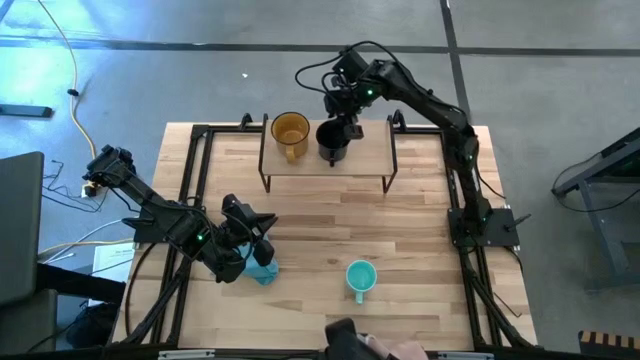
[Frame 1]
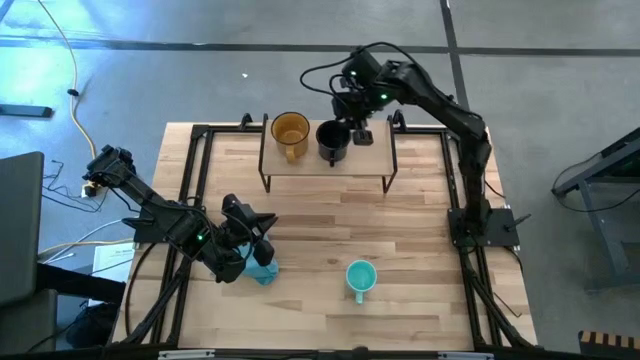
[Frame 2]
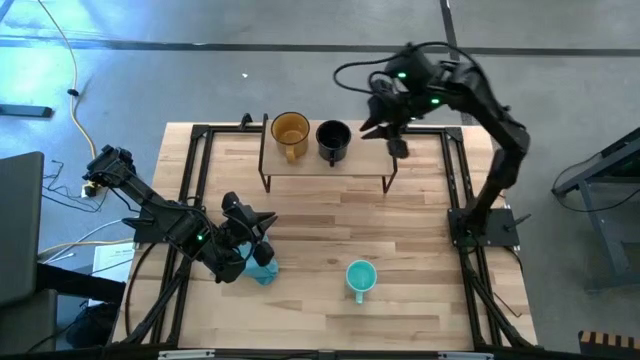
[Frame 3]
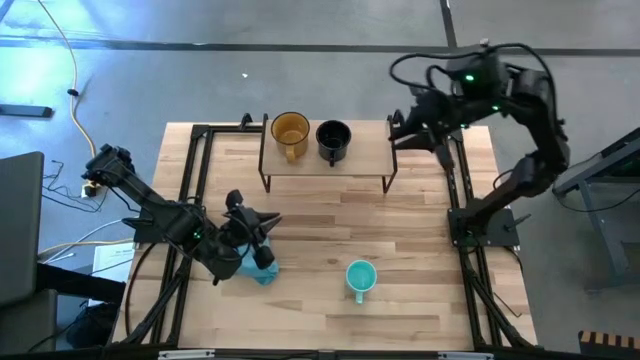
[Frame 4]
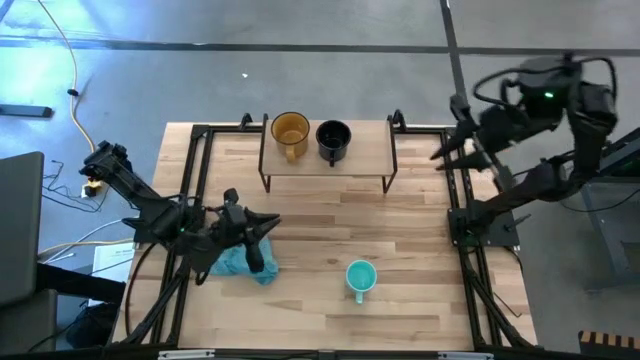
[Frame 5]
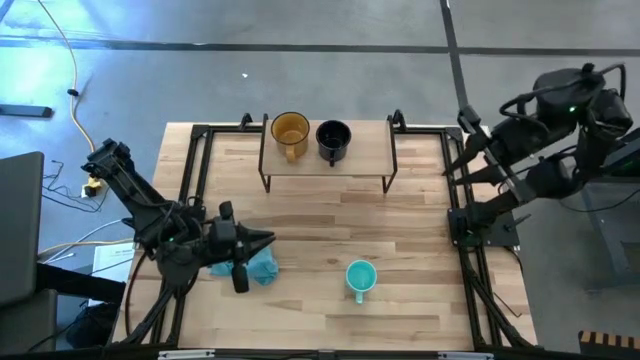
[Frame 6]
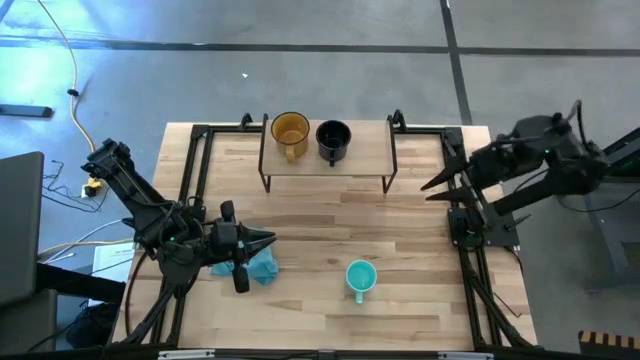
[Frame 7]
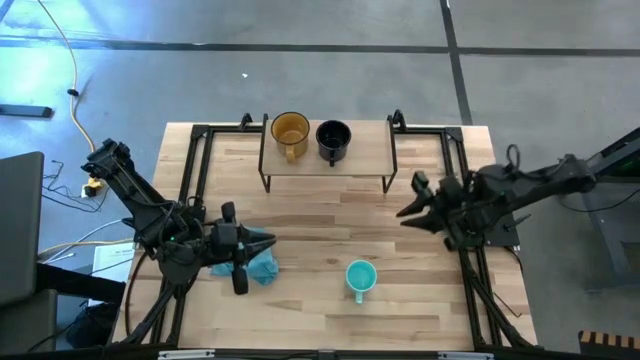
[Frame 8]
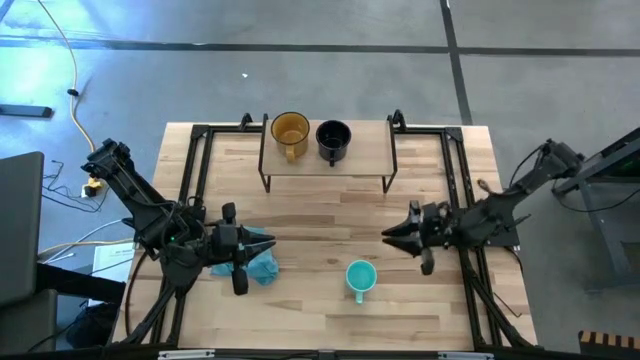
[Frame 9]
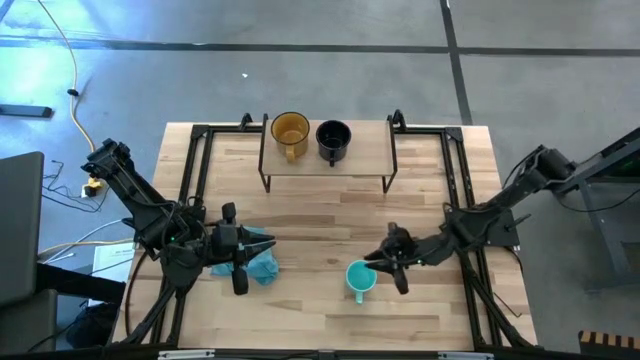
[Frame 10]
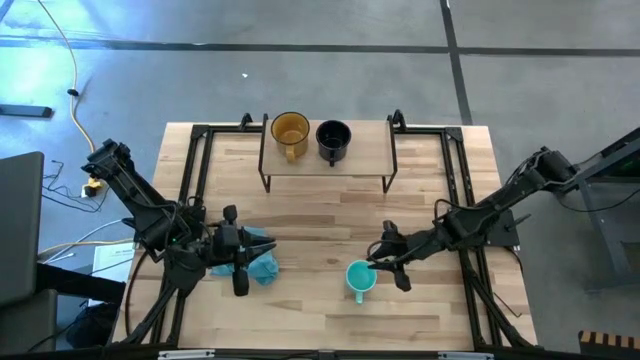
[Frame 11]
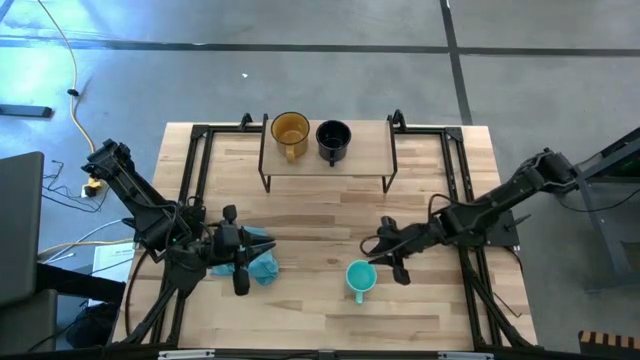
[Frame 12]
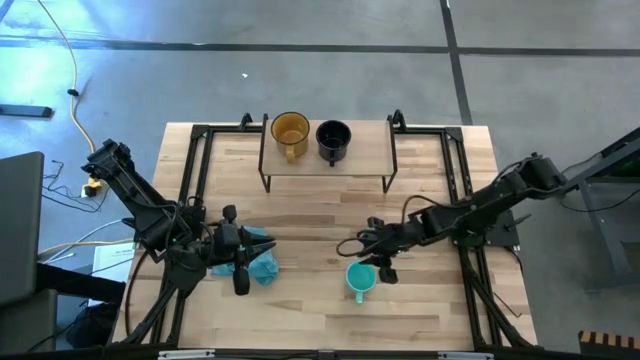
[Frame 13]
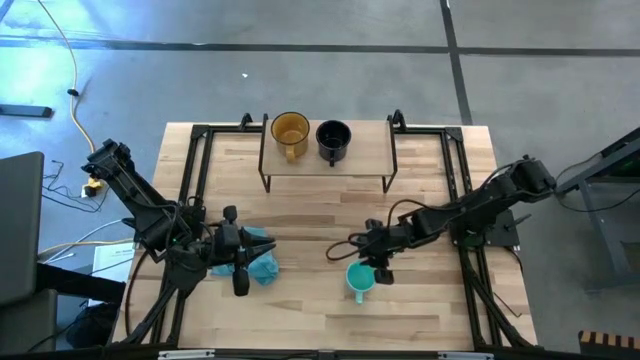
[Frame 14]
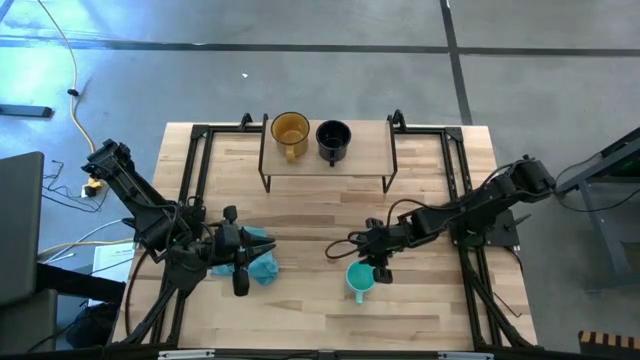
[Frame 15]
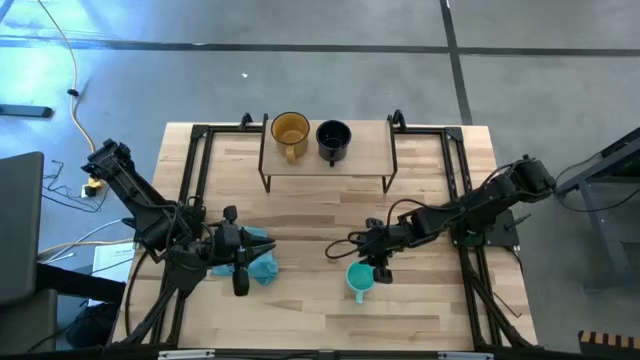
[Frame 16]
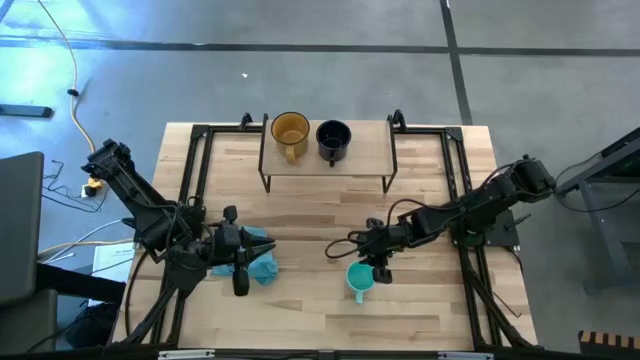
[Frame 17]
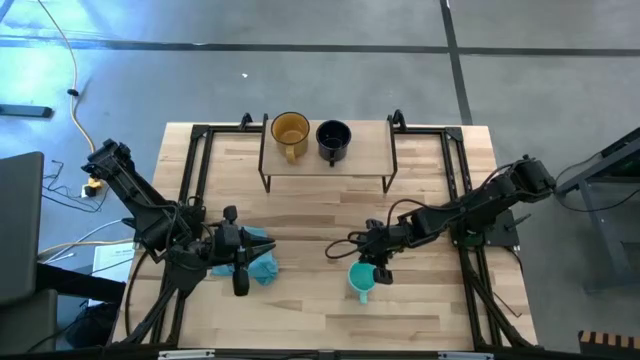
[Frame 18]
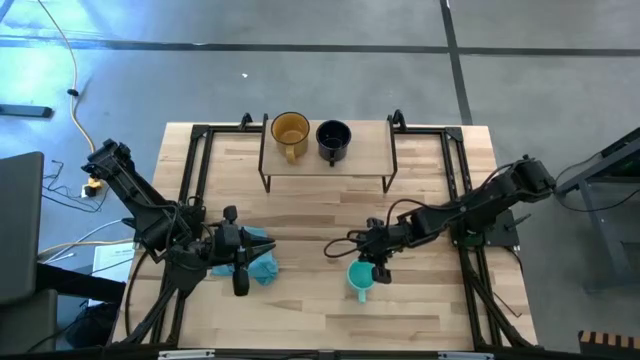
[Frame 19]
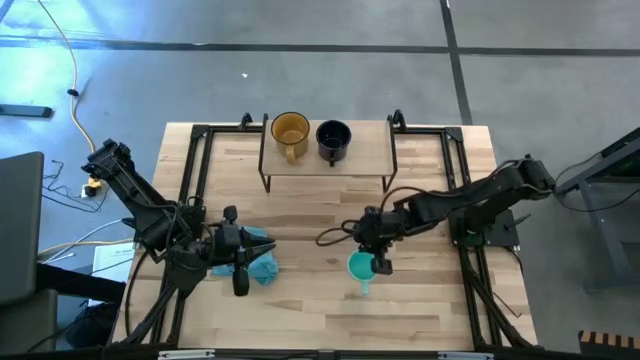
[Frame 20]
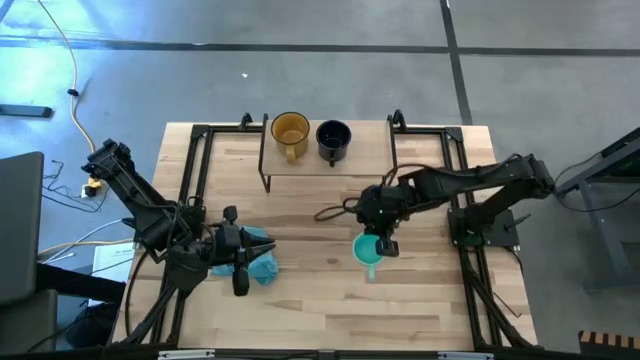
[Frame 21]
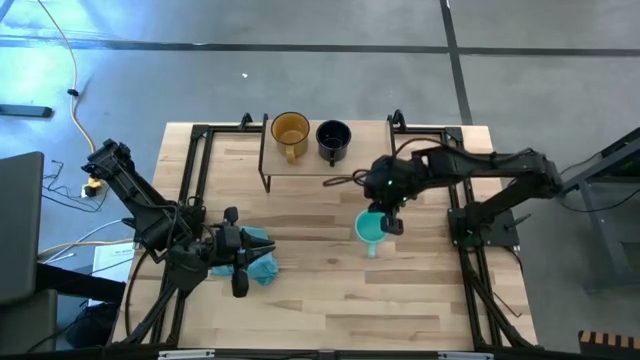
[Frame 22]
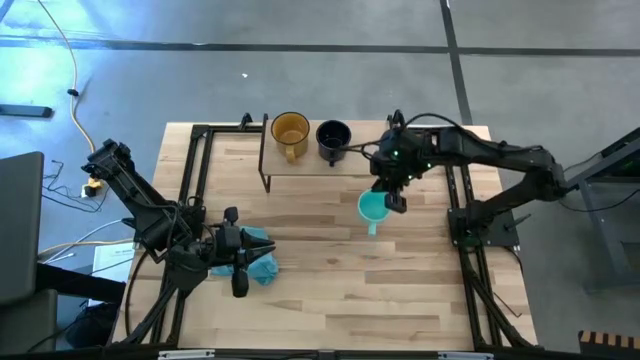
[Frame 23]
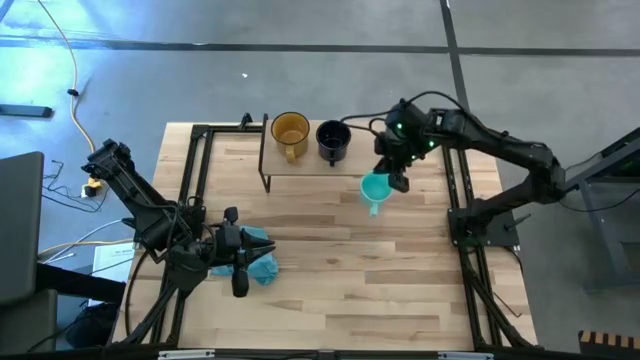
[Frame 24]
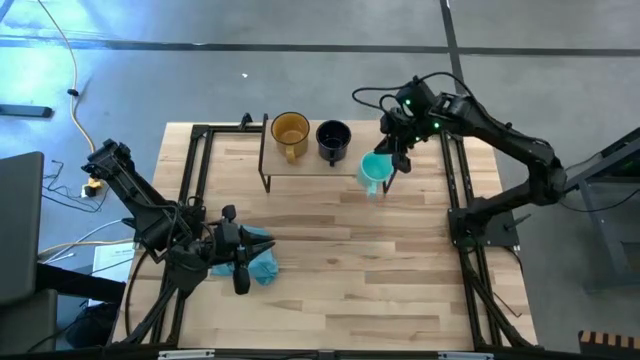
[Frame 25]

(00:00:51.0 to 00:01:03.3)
Task: Stack small to large cups/mugs on shelf
Put the light blue cup on the shelf

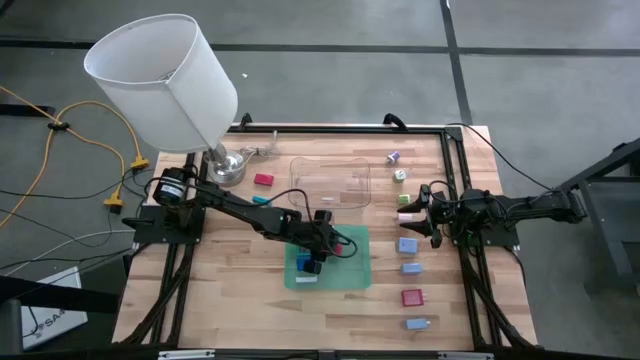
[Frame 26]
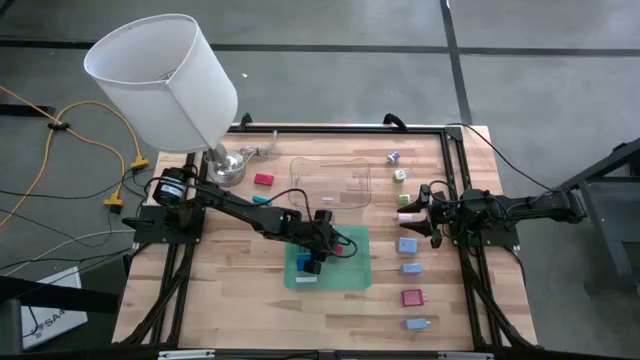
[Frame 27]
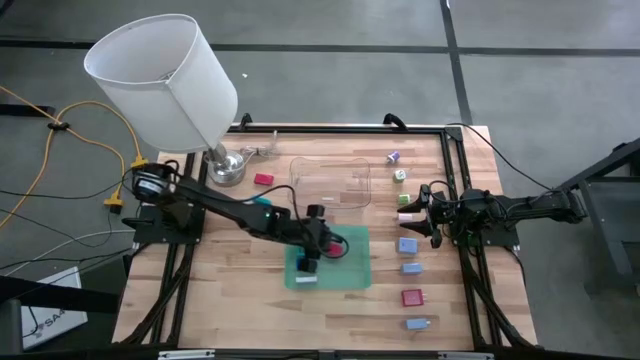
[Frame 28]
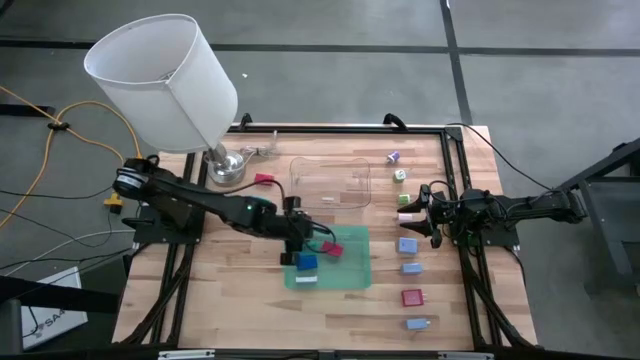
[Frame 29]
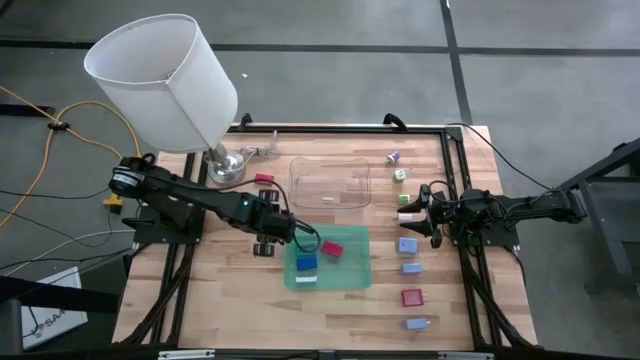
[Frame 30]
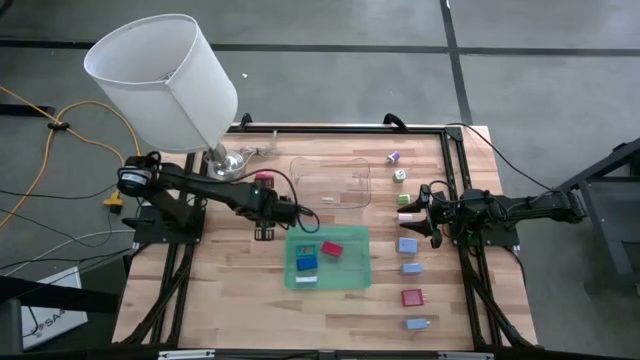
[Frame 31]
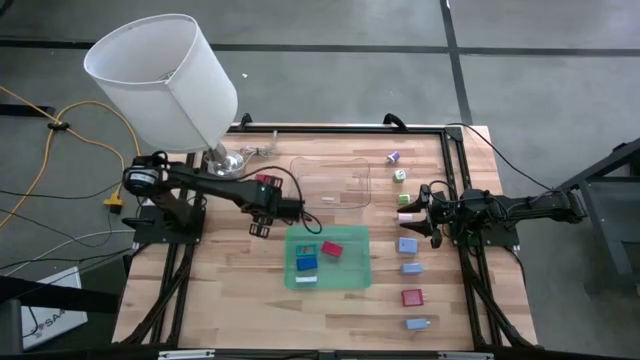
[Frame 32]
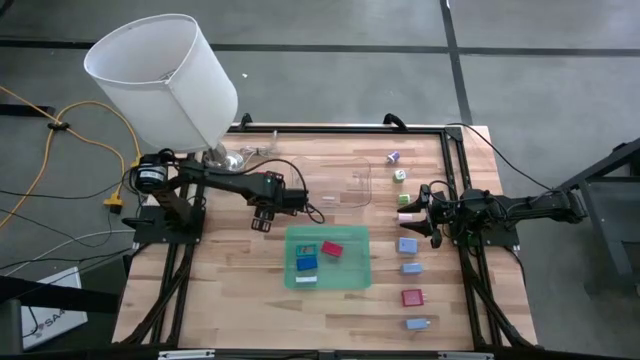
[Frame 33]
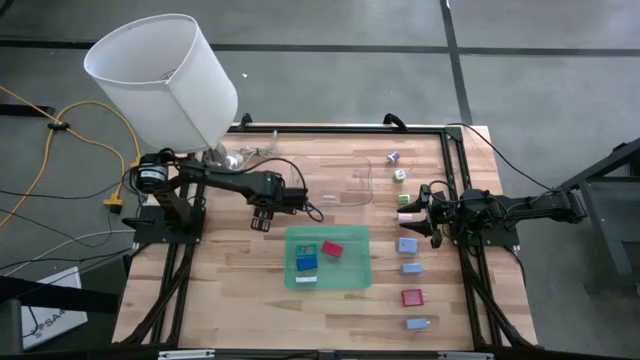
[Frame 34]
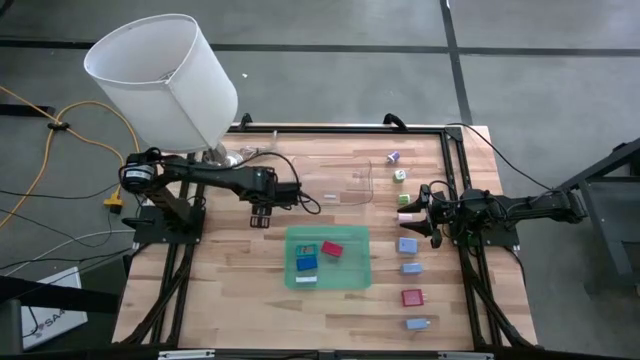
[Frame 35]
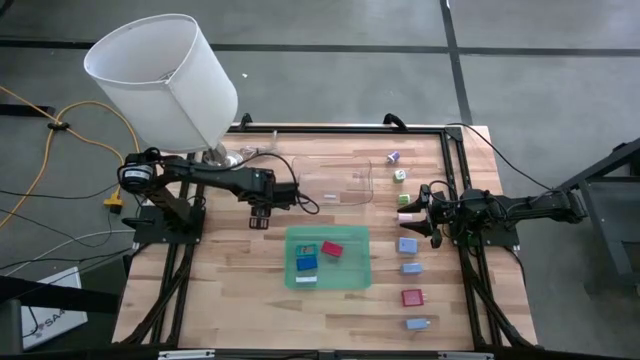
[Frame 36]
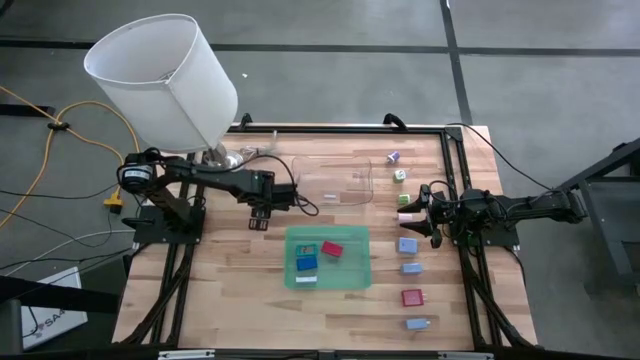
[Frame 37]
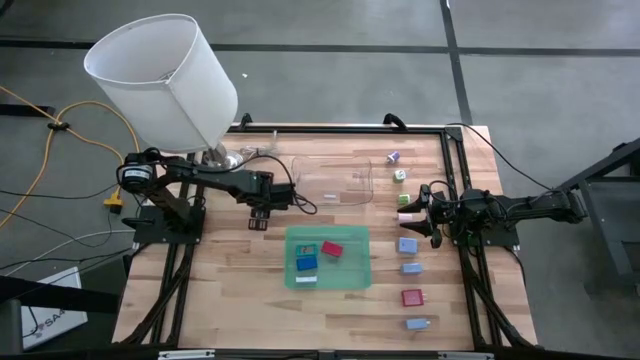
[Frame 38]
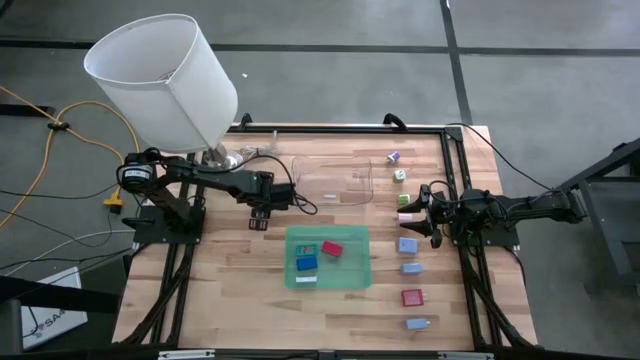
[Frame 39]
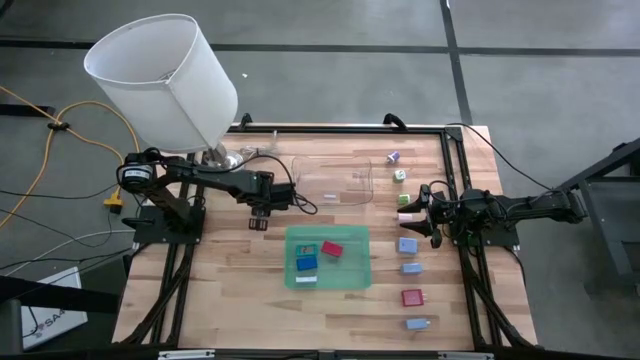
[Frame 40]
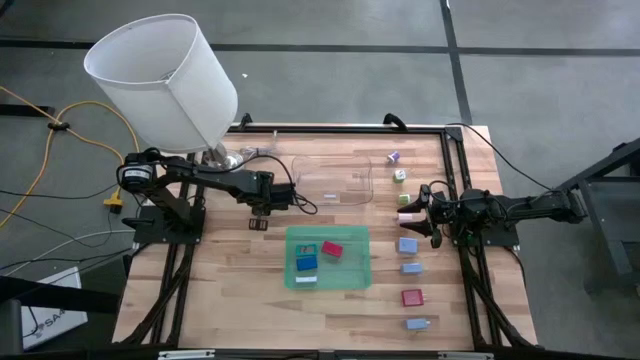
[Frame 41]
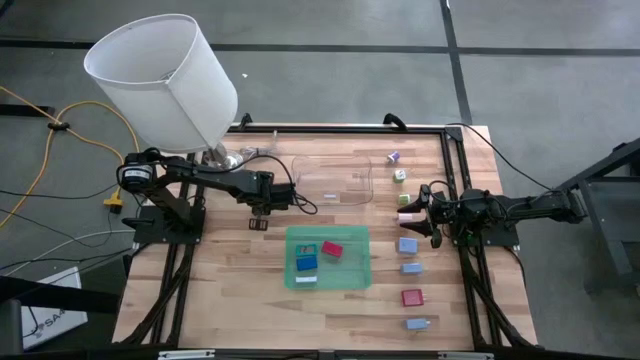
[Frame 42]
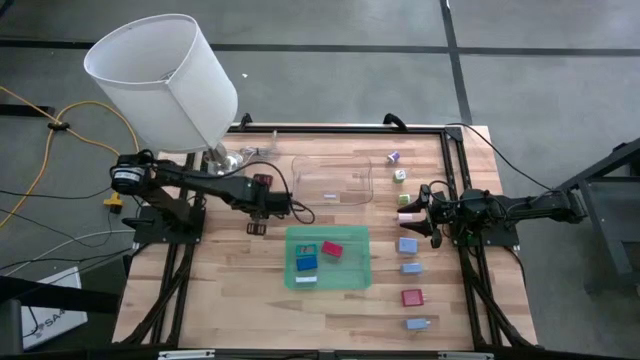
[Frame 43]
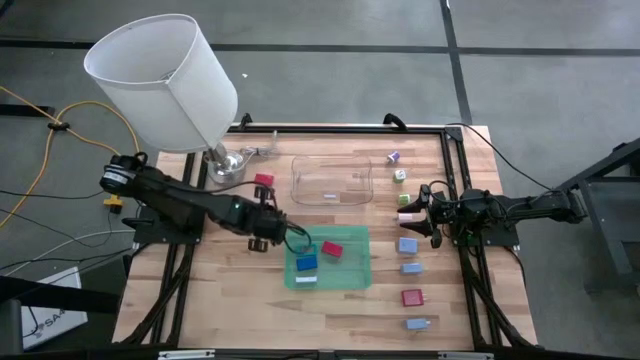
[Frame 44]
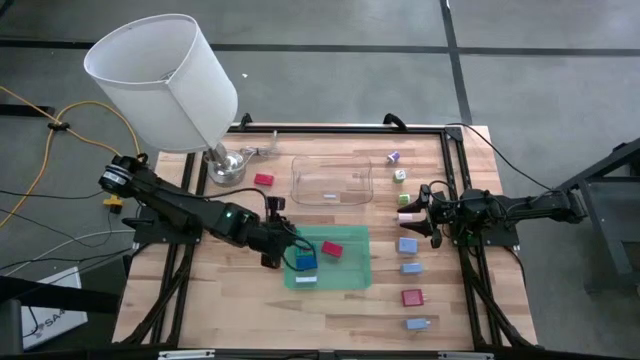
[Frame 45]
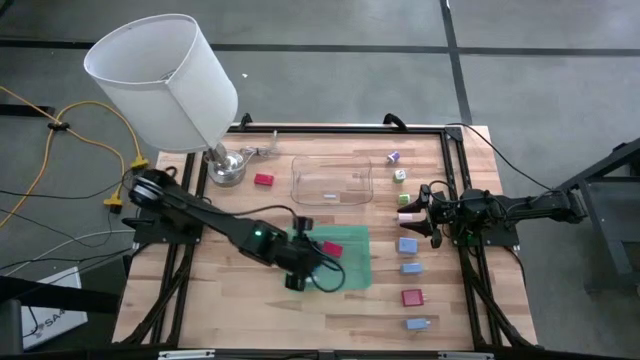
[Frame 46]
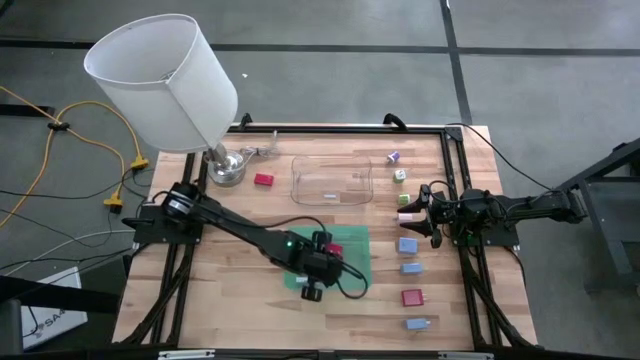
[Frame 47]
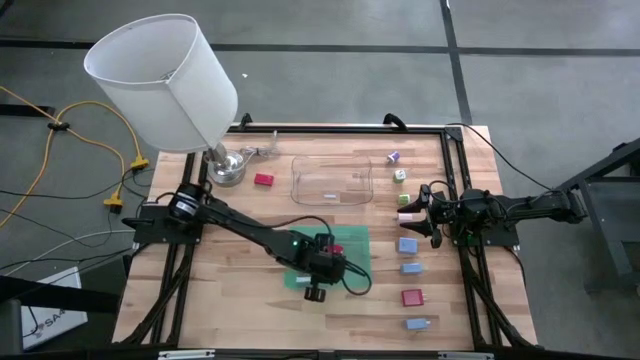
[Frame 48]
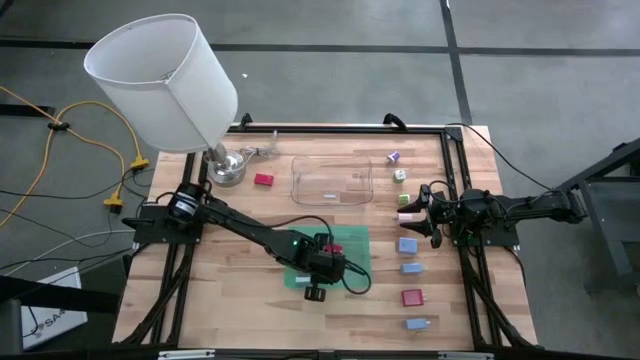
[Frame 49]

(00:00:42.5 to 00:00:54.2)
Task: Pick & Place Office items
Put the light blue digital clock into the blue bin
